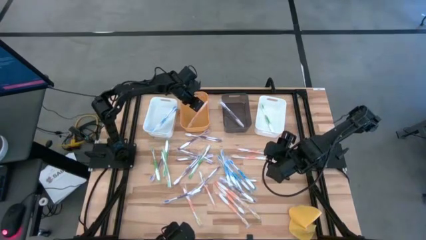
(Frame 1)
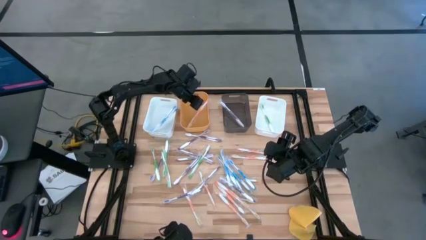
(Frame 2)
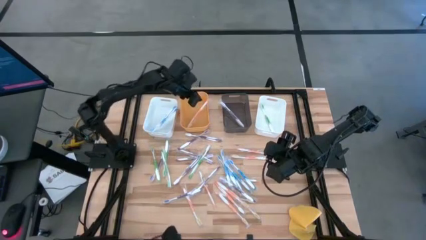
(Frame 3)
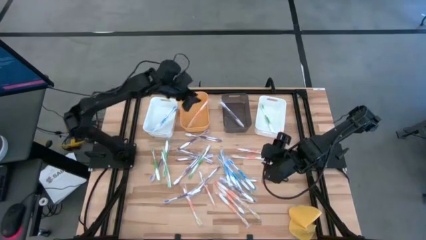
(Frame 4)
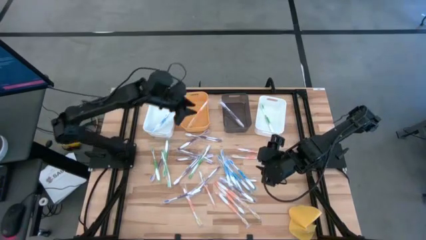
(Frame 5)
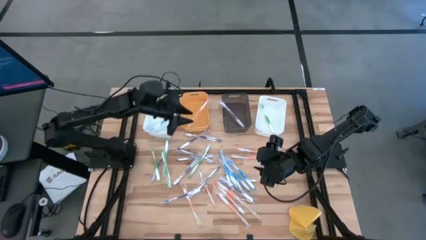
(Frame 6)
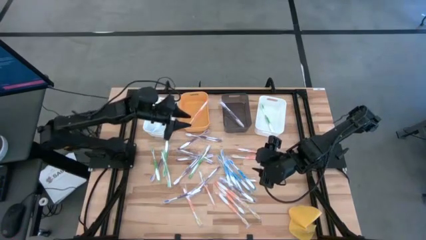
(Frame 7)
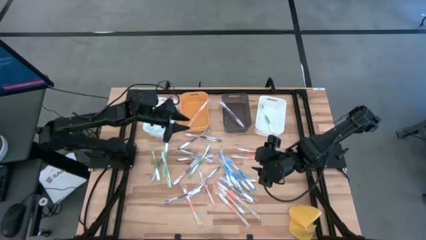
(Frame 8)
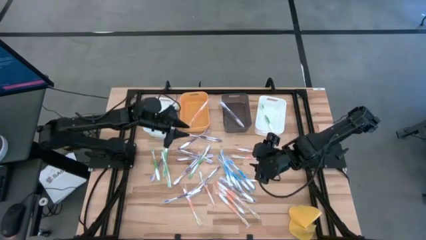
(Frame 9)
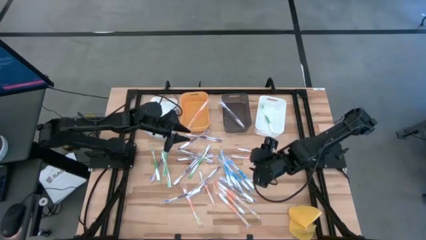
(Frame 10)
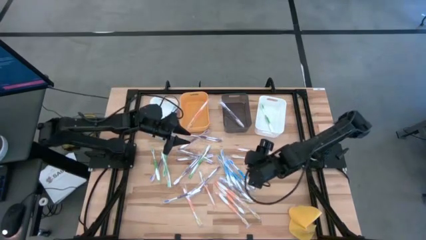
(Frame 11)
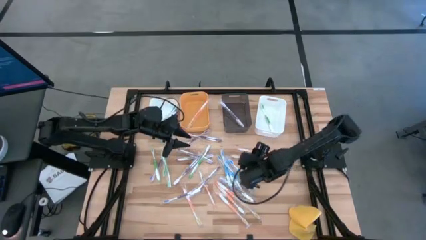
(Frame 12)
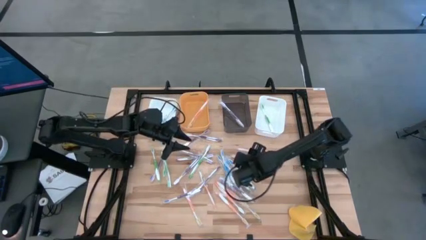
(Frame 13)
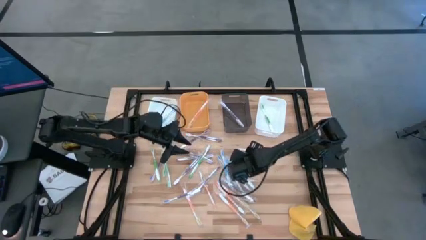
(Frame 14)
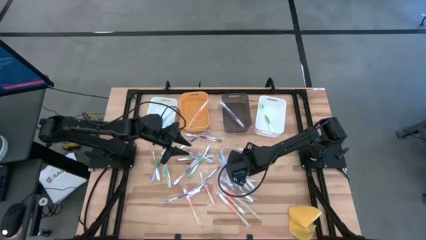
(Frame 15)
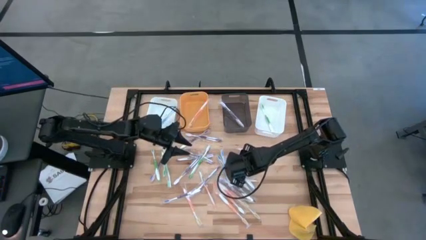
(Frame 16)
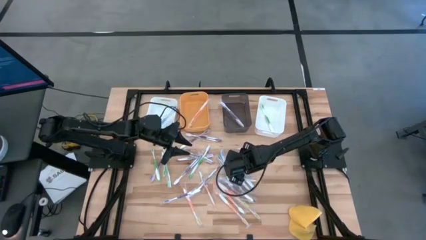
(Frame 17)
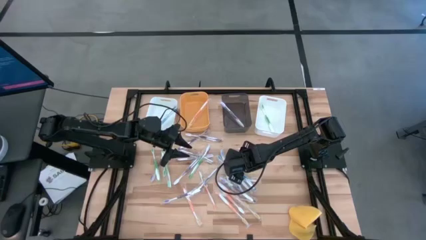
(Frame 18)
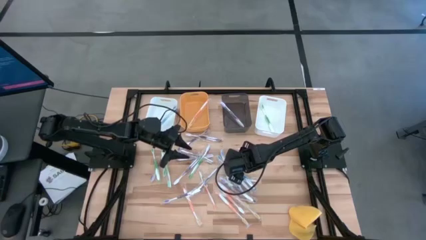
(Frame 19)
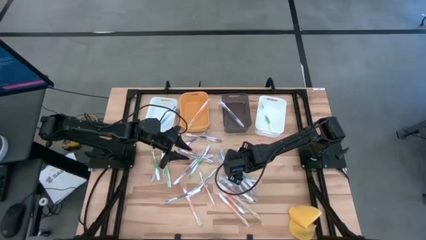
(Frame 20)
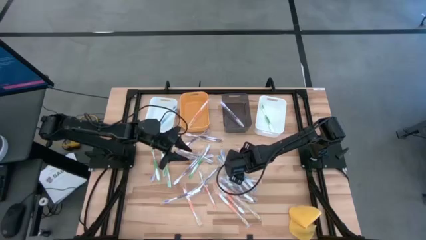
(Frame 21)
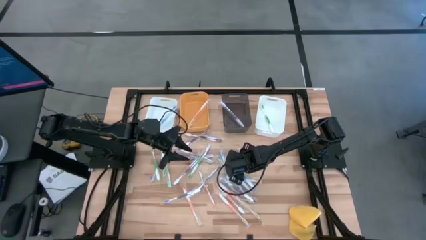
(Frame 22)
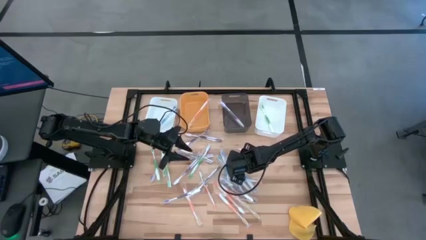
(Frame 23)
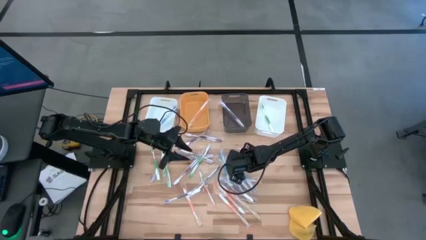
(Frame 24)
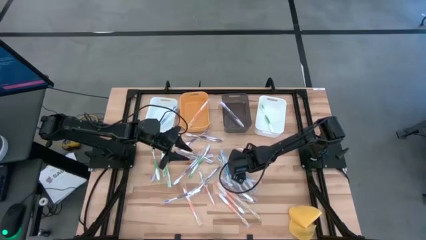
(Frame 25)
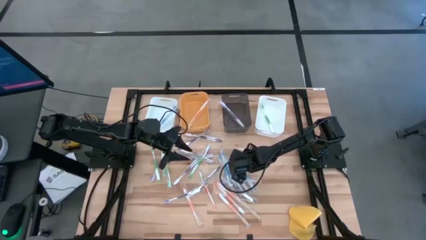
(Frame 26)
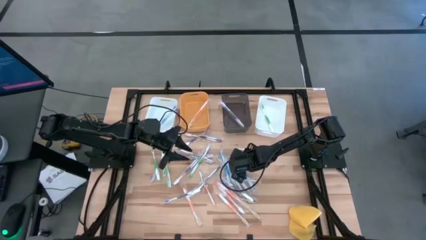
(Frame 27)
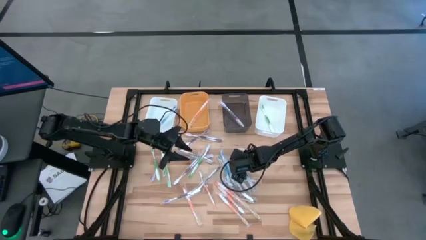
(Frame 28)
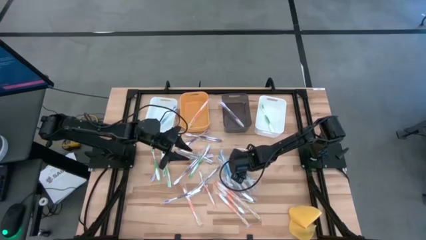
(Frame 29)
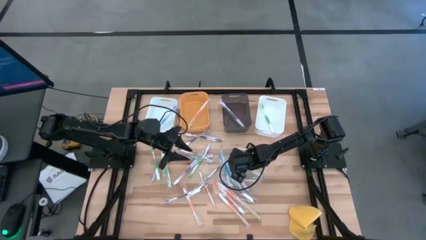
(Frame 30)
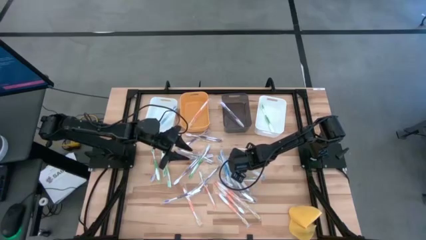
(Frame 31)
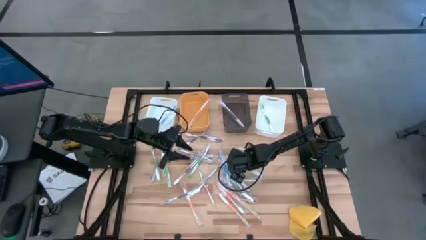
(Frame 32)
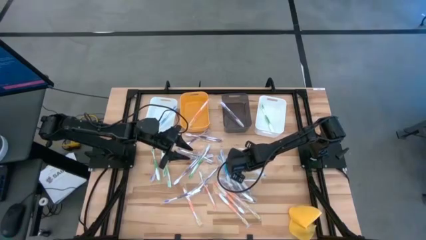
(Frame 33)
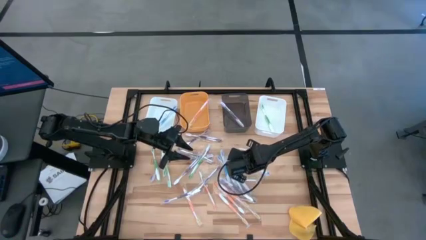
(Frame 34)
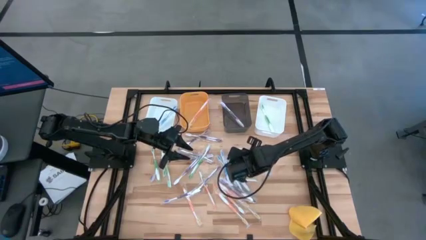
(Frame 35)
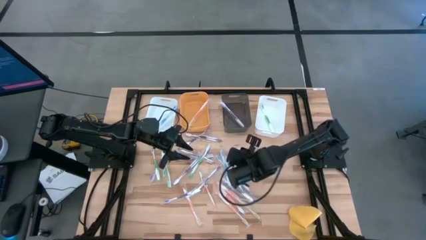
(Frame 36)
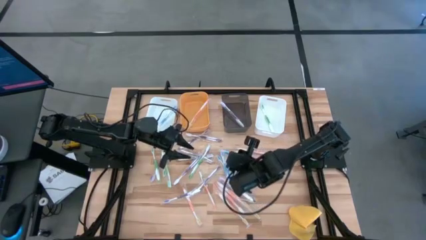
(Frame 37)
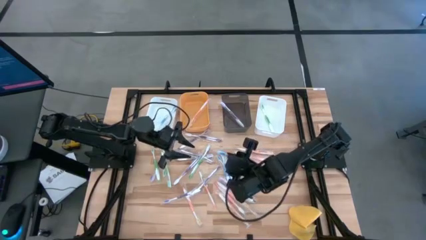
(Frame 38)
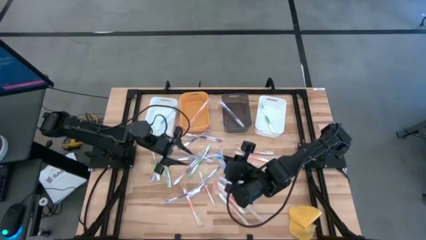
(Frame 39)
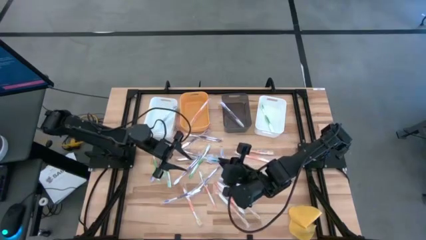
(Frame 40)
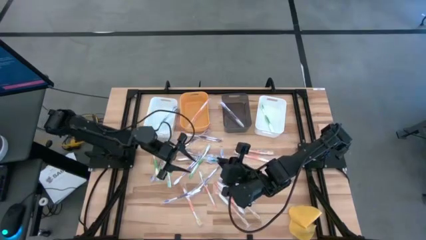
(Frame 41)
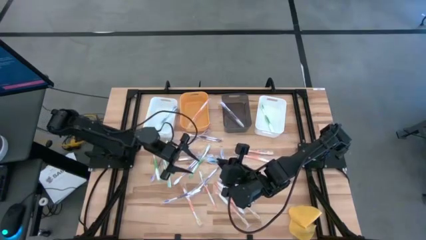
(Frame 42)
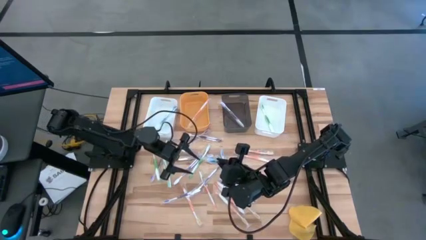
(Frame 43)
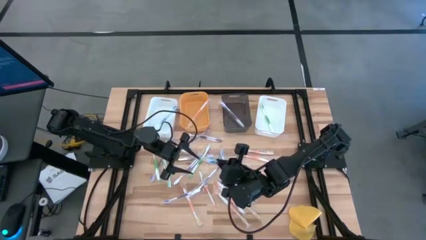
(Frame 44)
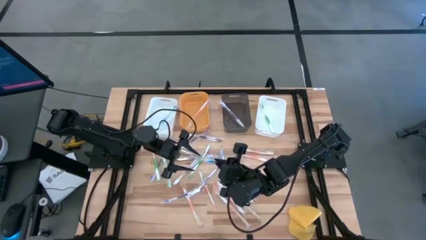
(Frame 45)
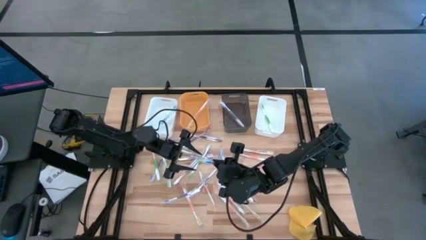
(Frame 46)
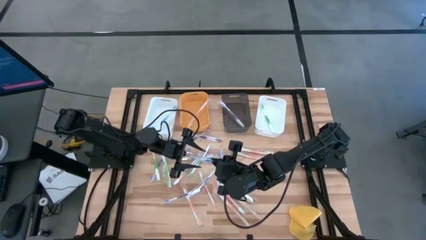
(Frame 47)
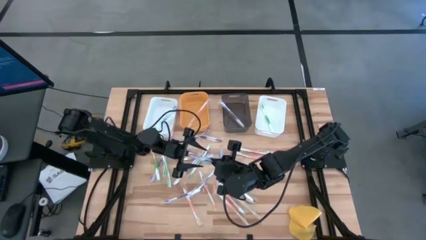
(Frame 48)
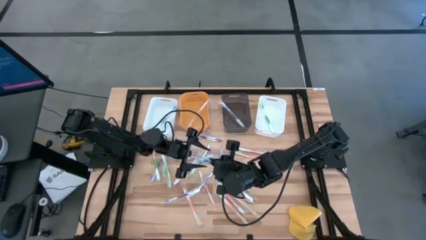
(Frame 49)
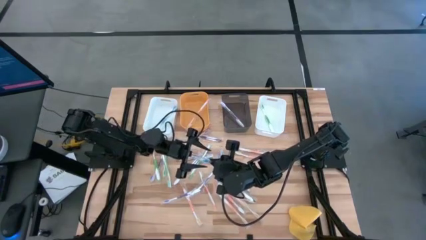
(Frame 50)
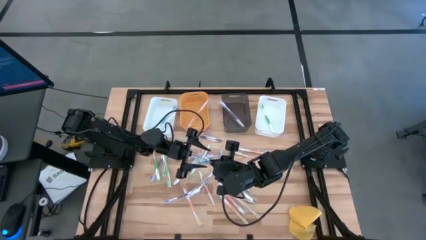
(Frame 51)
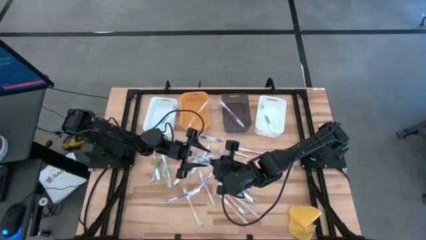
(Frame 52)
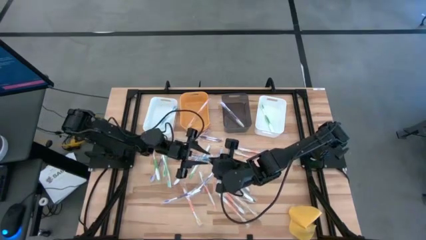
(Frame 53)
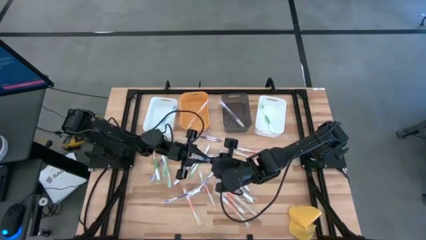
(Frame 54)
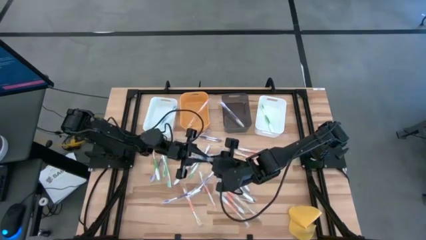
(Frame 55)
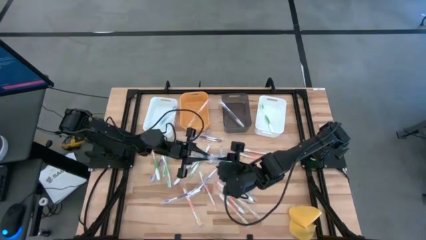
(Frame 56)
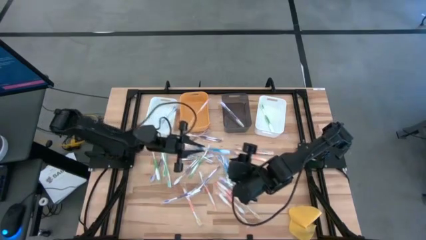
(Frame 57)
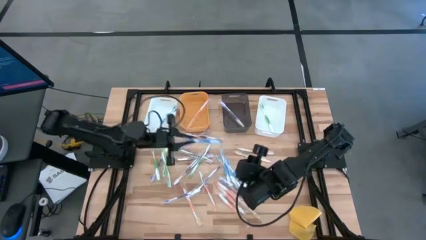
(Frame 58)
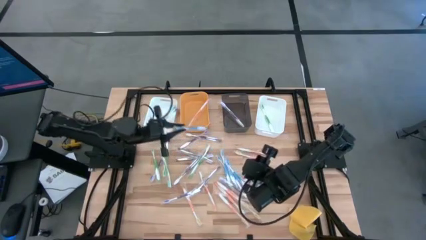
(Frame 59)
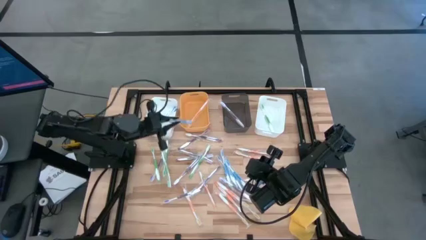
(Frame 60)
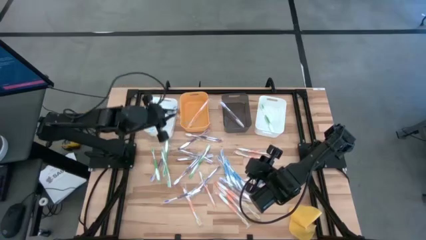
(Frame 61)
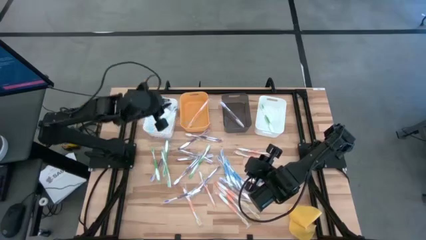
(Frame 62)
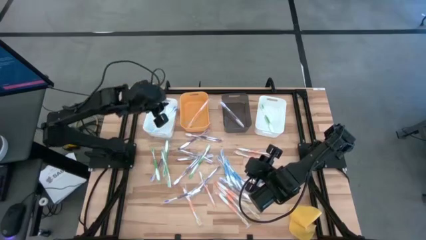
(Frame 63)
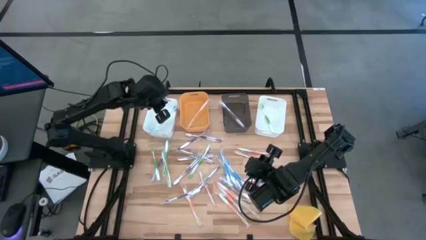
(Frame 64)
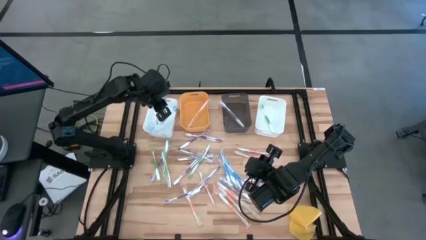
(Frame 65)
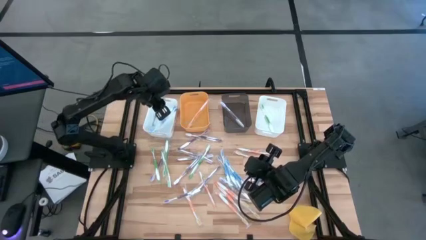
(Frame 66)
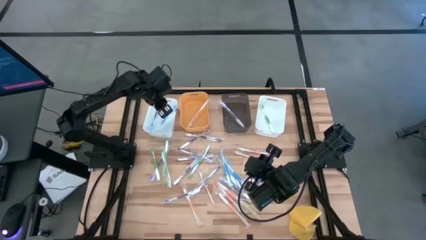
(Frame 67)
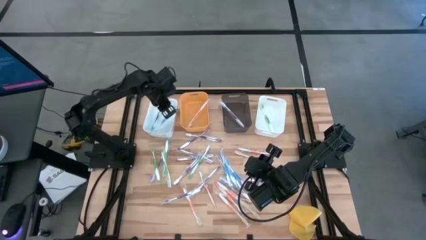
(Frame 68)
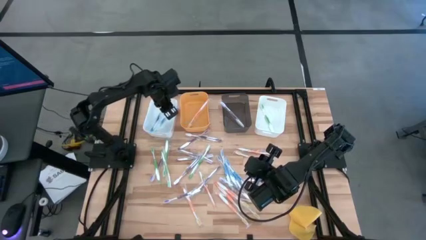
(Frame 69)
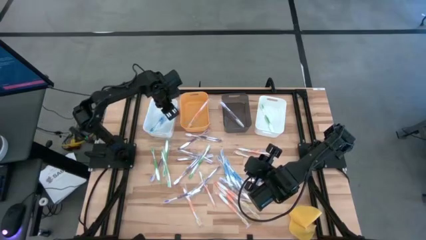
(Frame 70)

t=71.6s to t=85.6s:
Task: Pick & Place Toothbrushes
Put the blue toothbrush into the left white bin

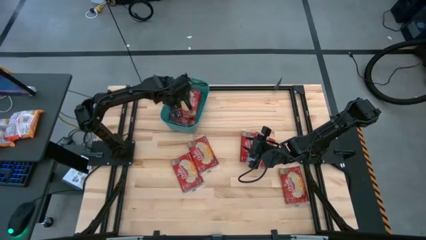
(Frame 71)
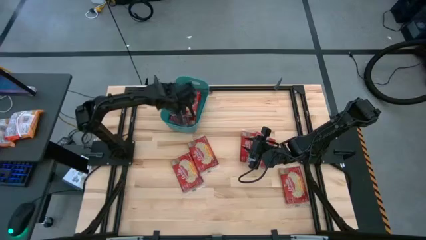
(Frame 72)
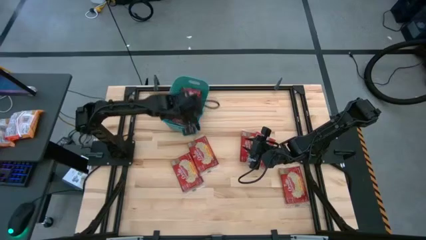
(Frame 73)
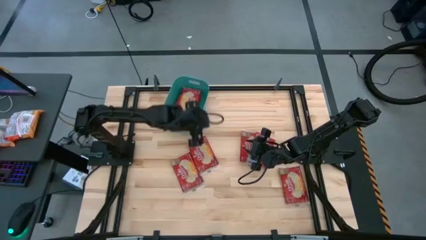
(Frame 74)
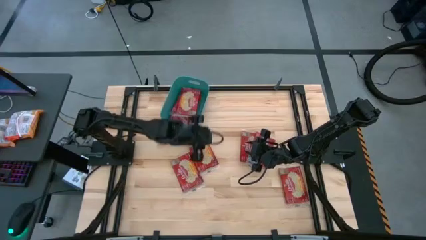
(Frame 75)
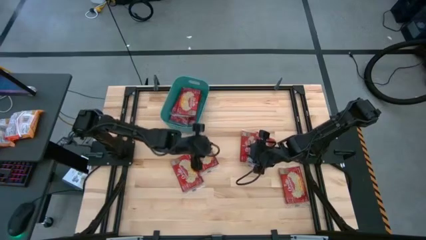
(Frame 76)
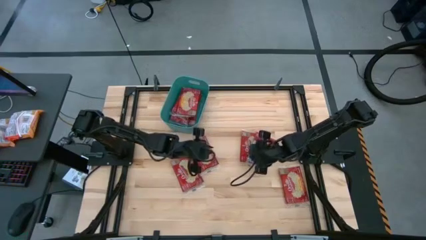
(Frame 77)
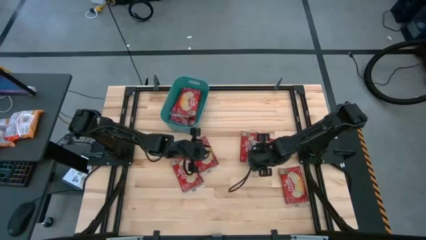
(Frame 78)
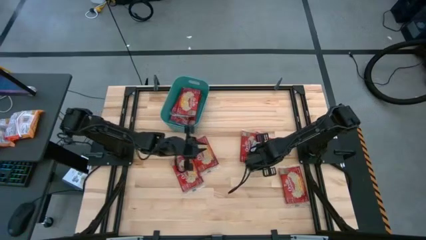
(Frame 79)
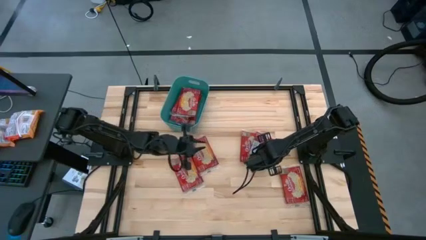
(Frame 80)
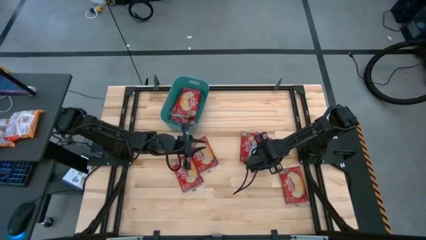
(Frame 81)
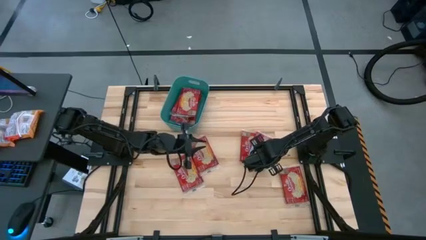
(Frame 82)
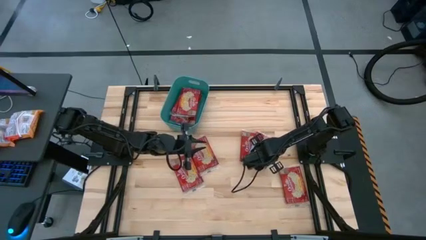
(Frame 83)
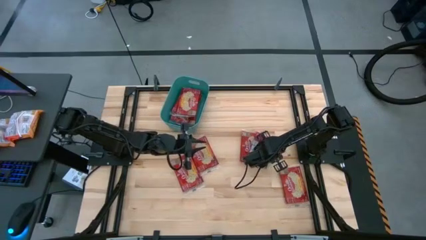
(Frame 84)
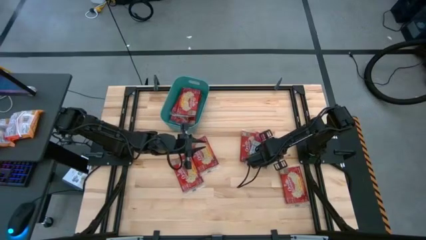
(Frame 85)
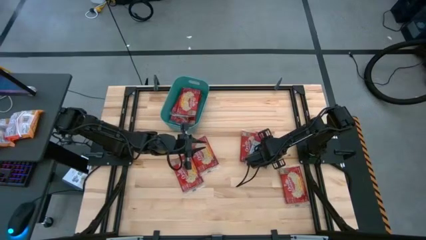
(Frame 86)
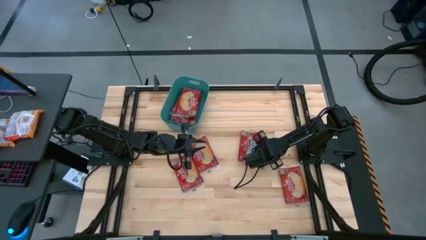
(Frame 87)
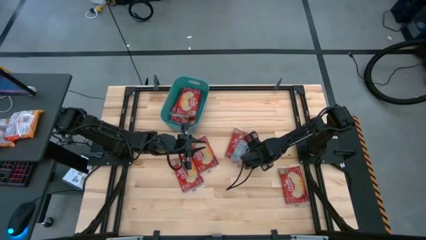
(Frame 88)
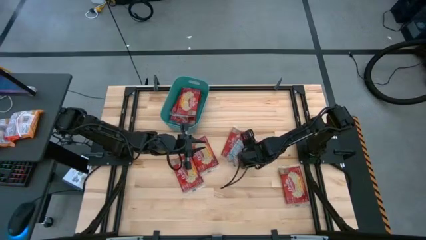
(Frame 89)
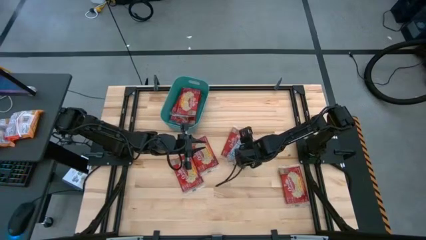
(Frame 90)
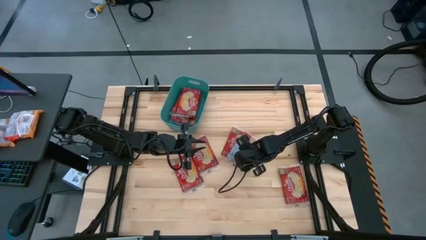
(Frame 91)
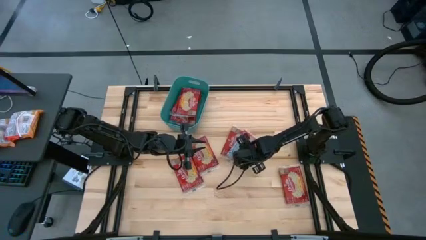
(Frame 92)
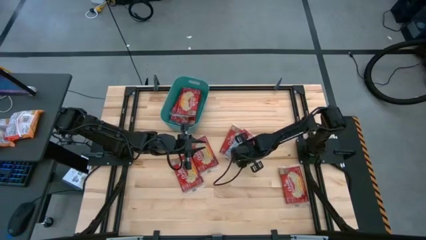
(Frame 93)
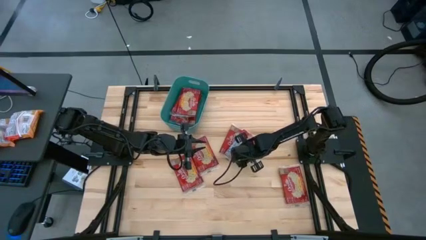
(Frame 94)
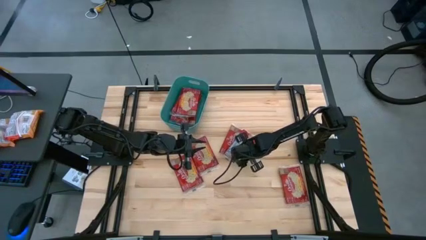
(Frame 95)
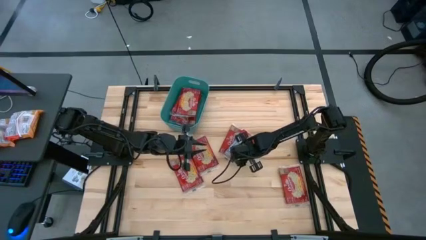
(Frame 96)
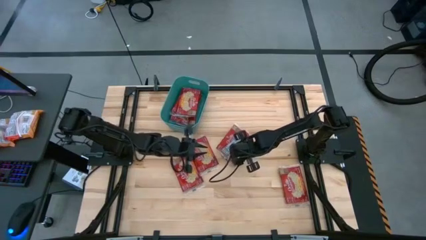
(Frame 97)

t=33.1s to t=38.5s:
Task: Sort popcorn bags into baskets
Put the red popcorn bag into the green bin
